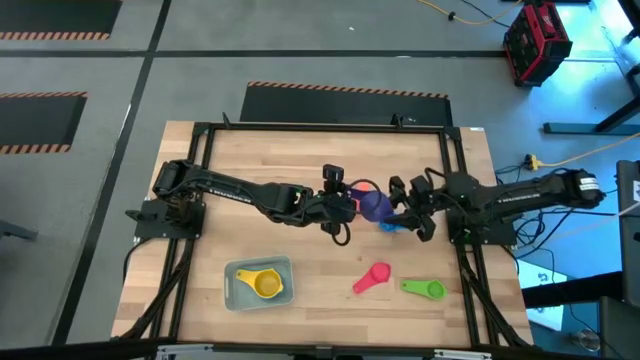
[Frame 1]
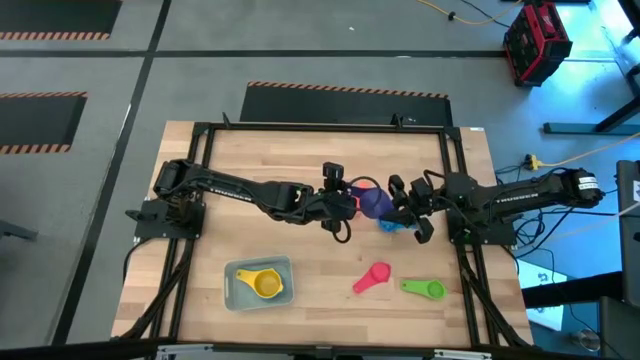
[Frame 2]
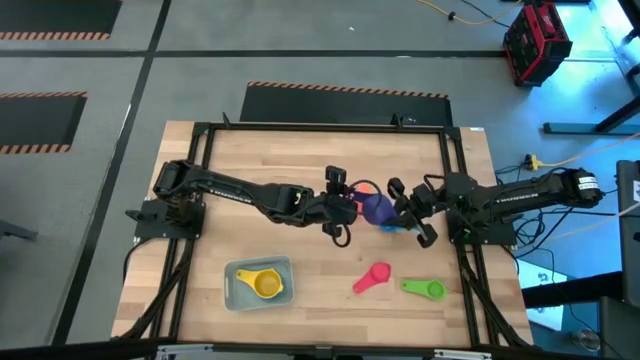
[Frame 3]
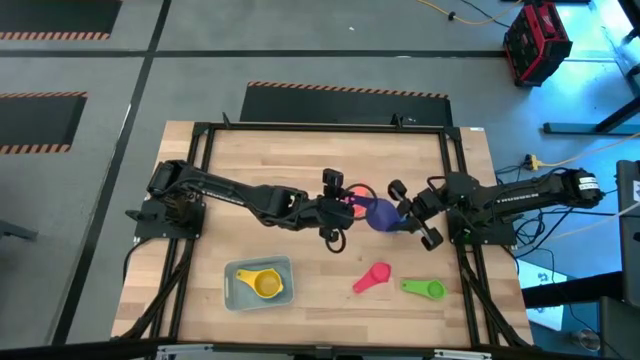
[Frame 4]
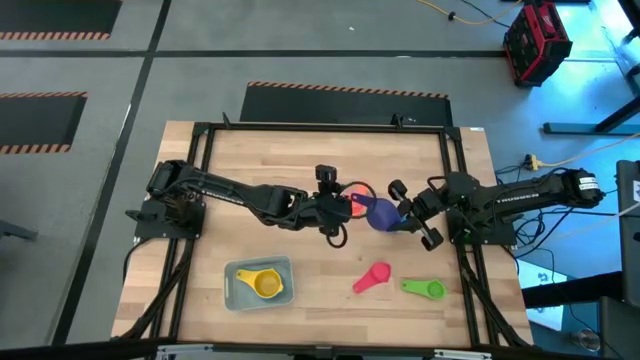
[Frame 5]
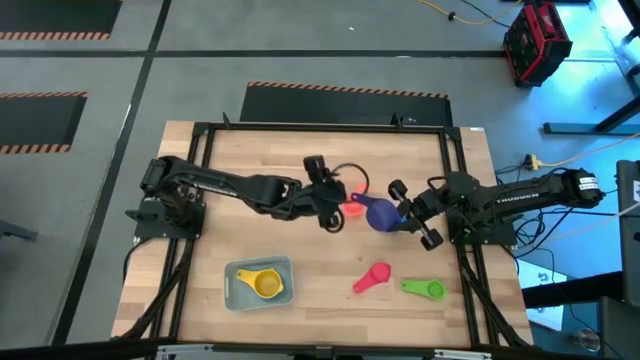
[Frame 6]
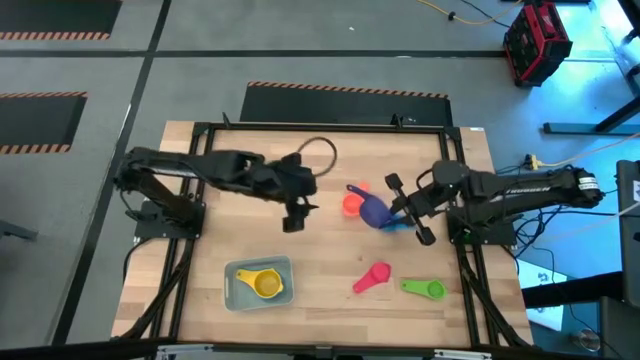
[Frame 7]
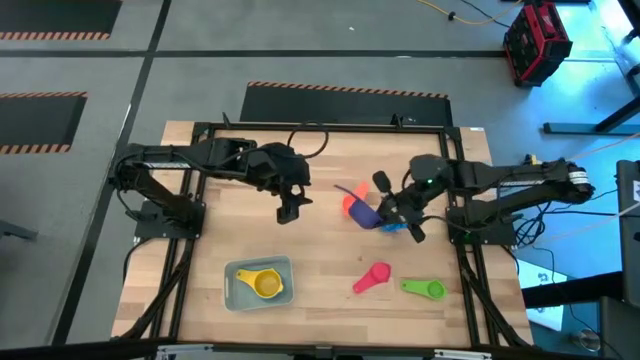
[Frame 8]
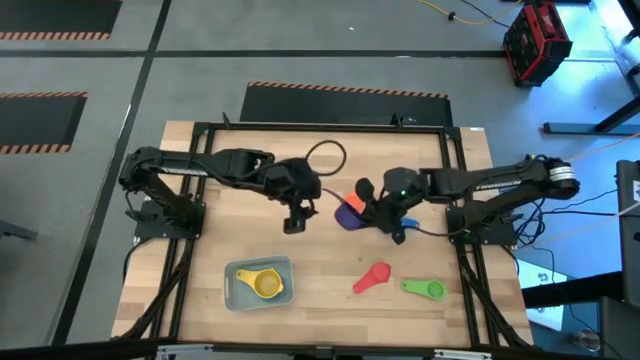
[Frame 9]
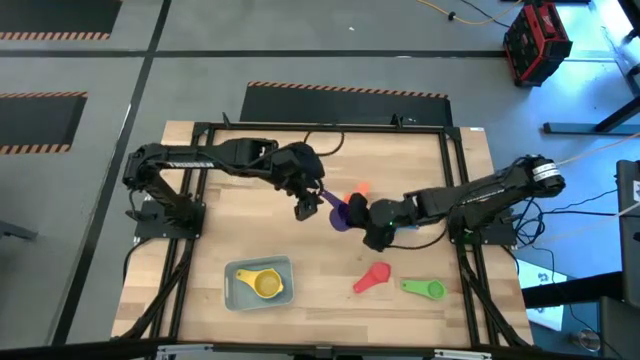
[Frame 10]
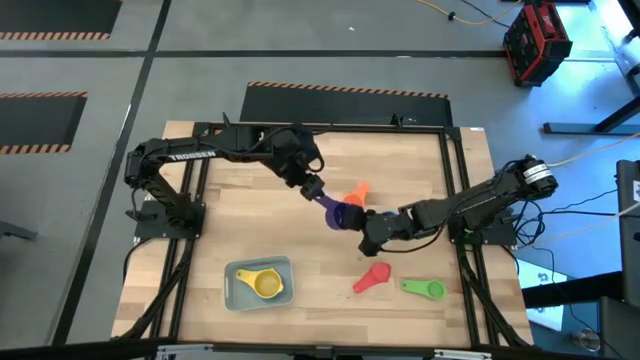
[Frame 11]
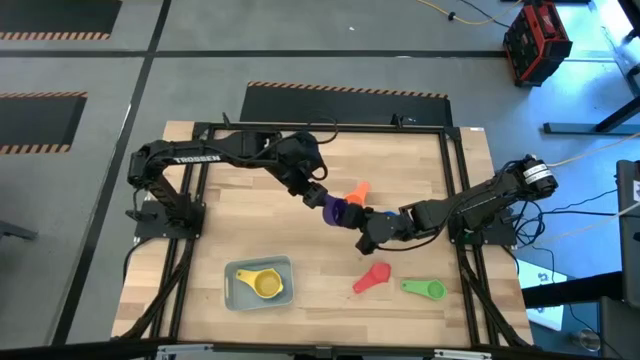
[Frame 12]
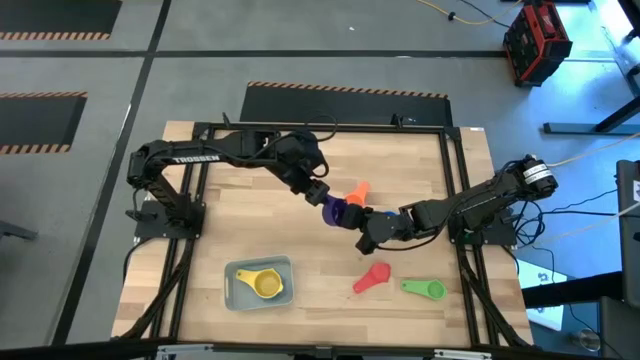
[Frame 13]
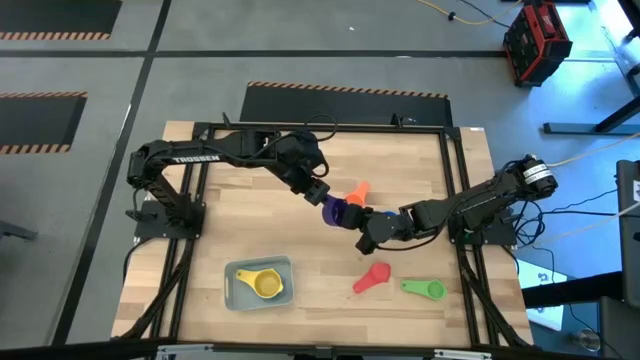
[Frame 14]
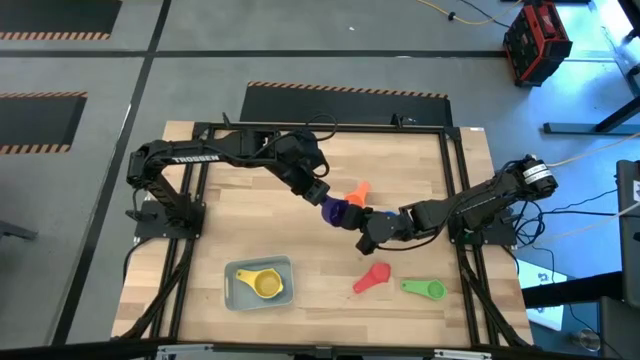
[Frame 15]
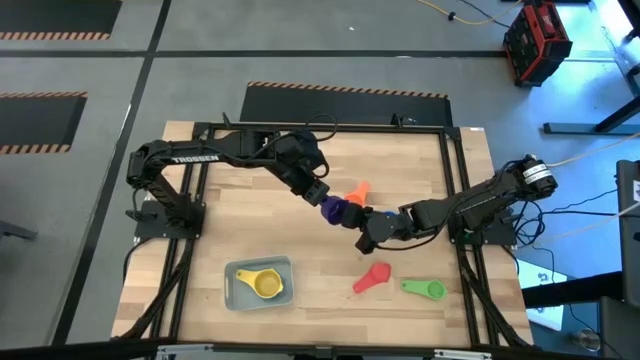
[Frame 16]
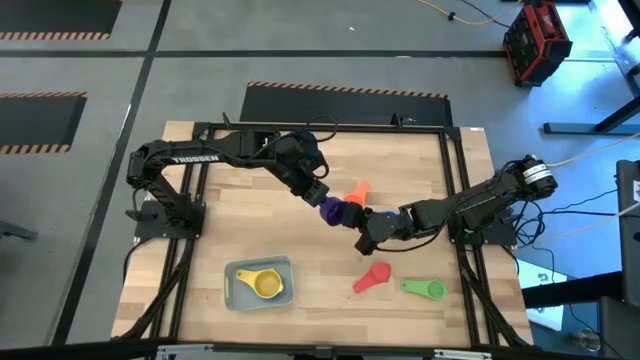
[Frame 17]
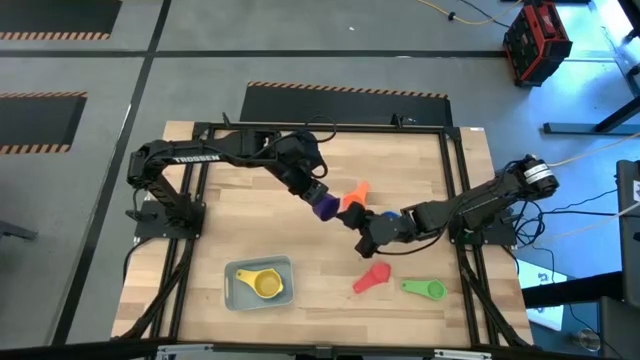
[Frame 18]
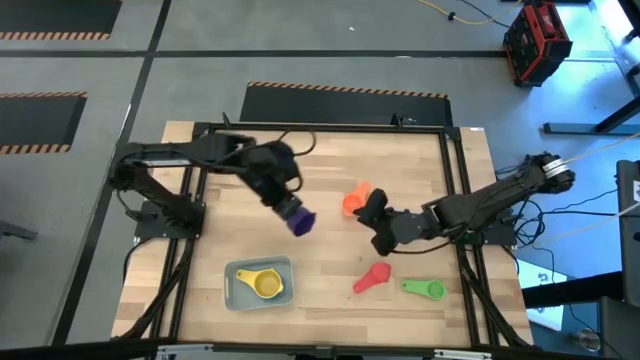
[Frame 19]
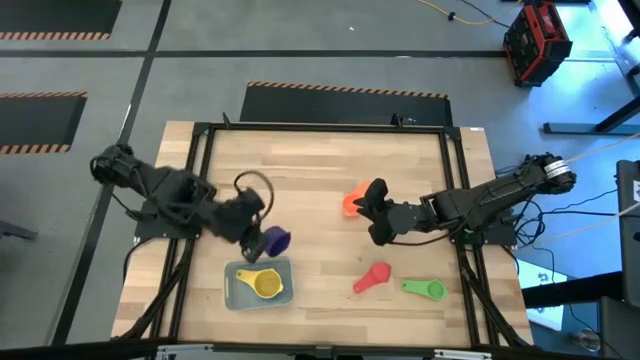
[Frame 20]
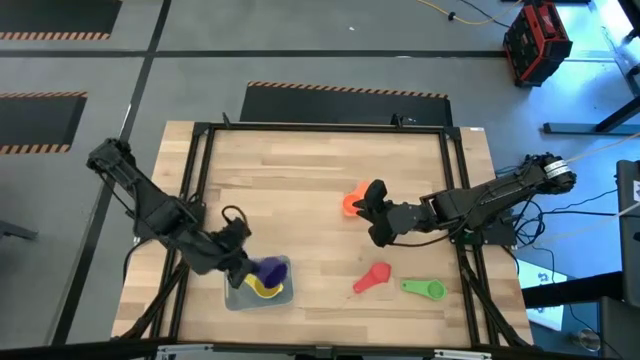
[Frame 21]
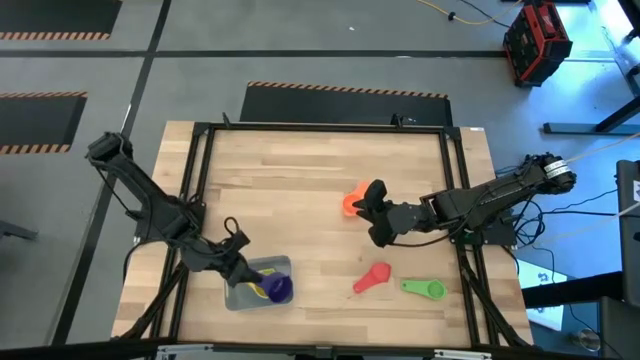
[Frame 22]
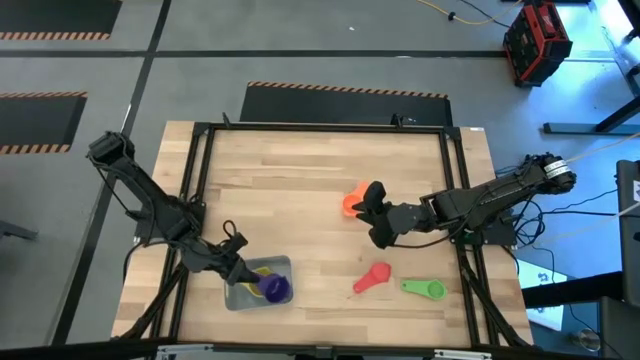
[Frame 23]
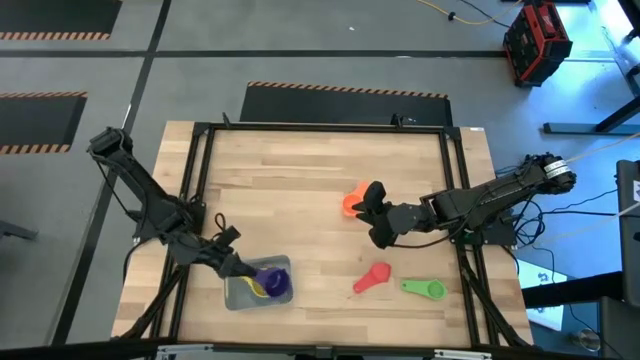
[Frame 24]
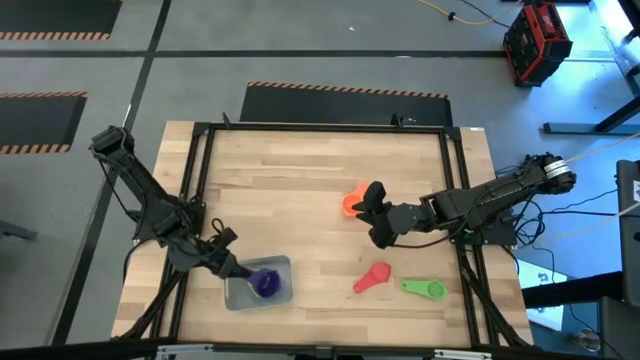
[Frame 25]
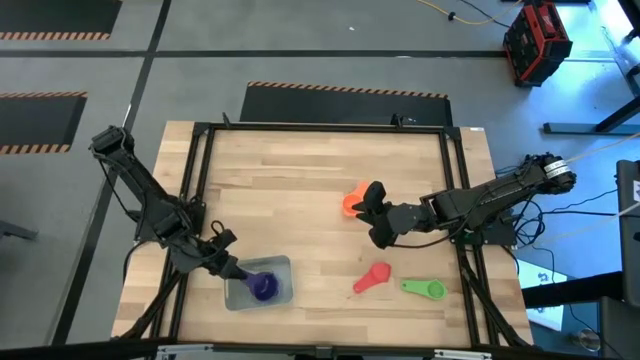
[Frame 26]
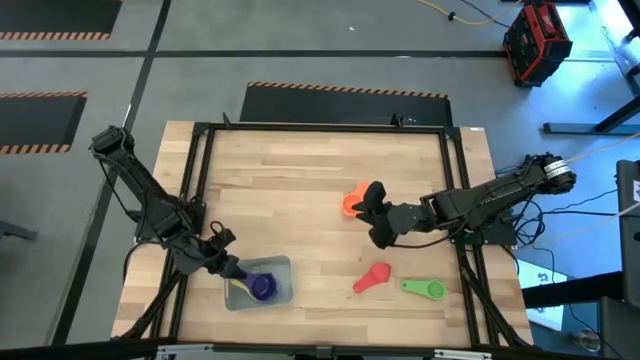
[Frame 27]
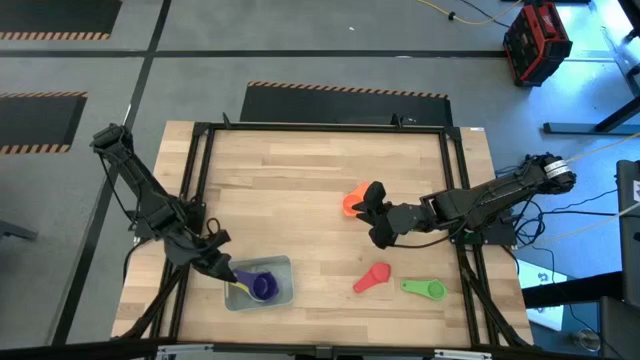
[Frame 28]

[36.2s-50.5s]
Task: Nest measuring cups in basket
Stack the violet measuring cup on top of the yellow measuring cup in the gray bin

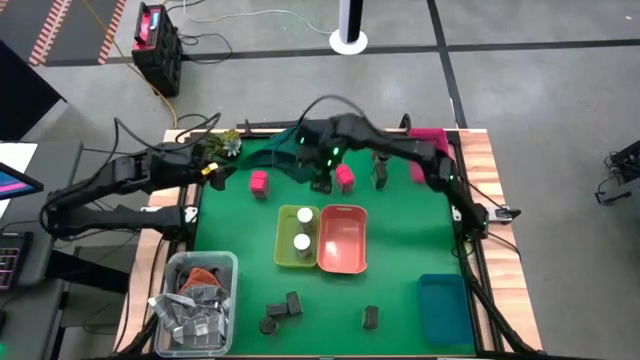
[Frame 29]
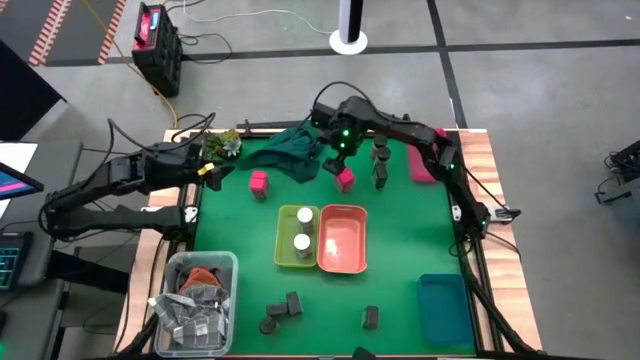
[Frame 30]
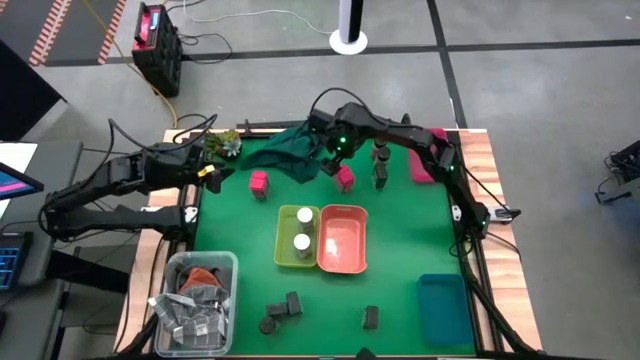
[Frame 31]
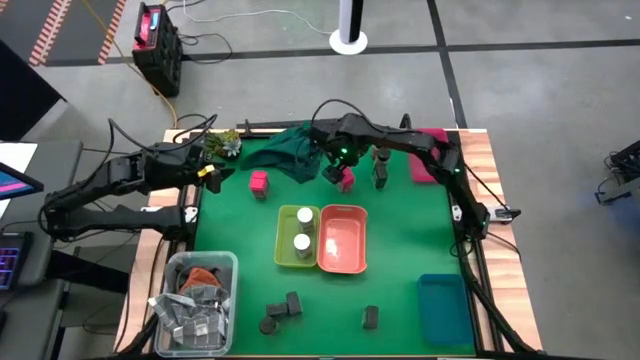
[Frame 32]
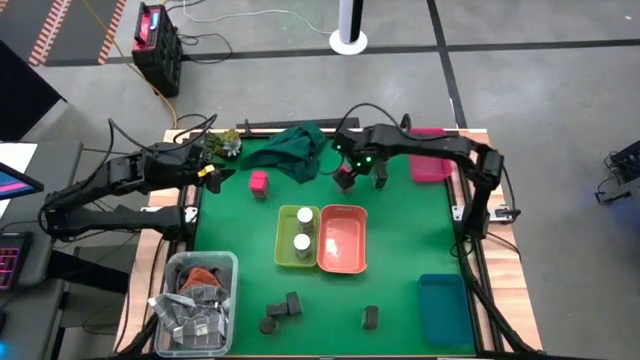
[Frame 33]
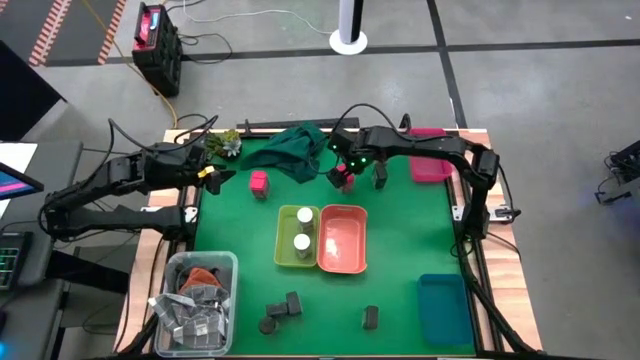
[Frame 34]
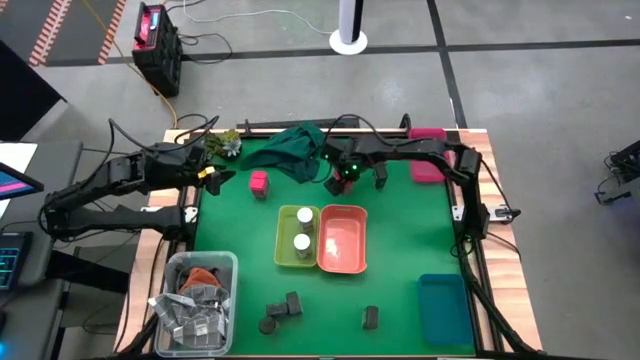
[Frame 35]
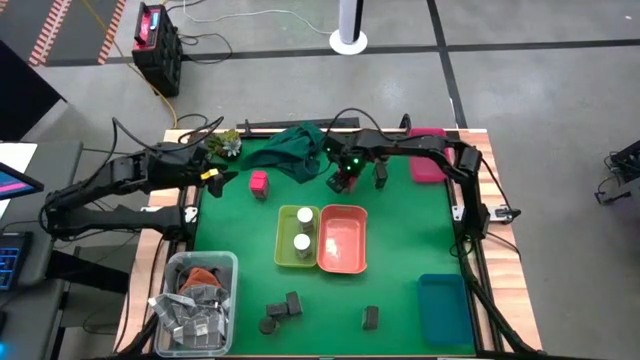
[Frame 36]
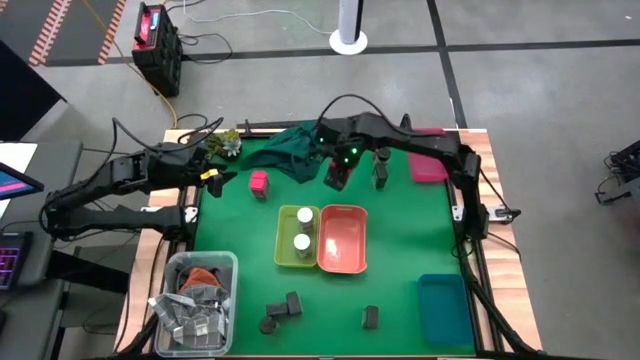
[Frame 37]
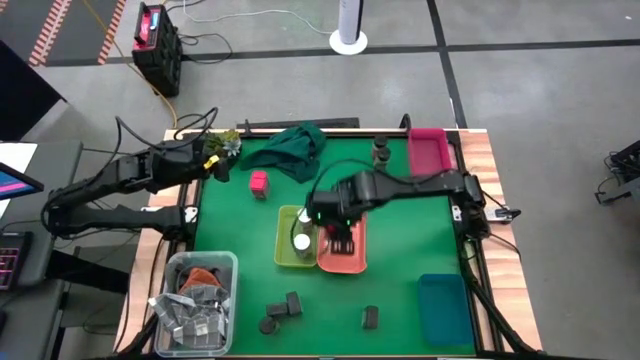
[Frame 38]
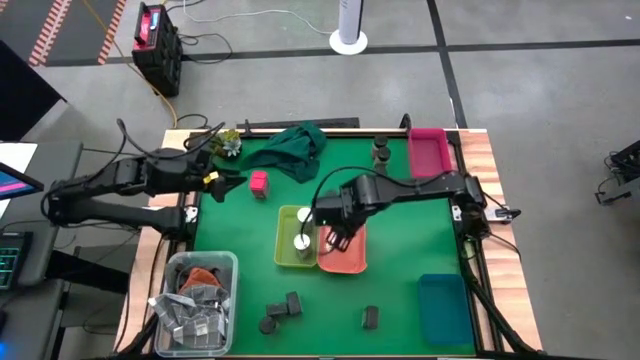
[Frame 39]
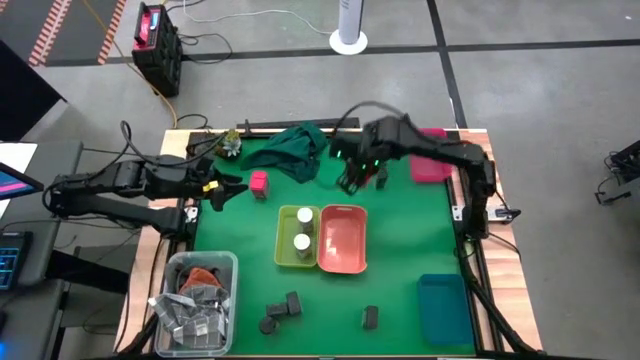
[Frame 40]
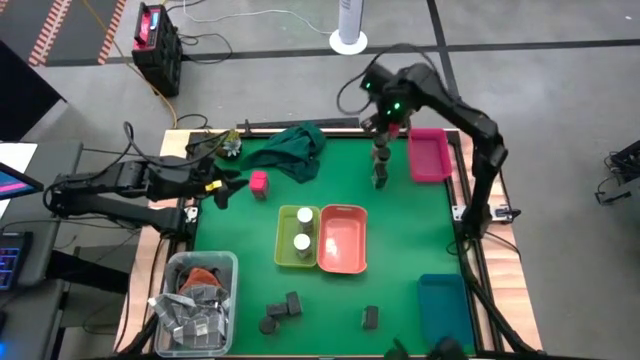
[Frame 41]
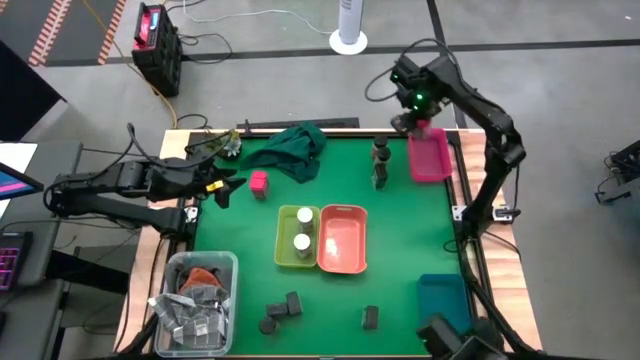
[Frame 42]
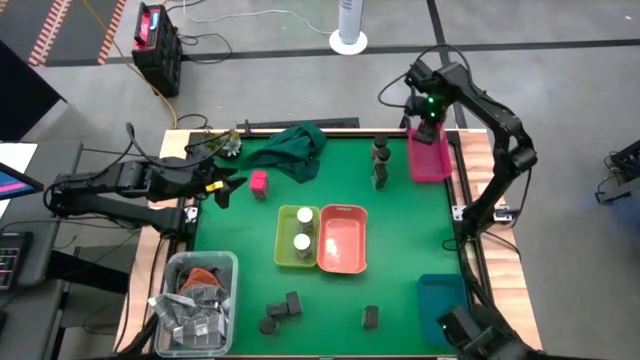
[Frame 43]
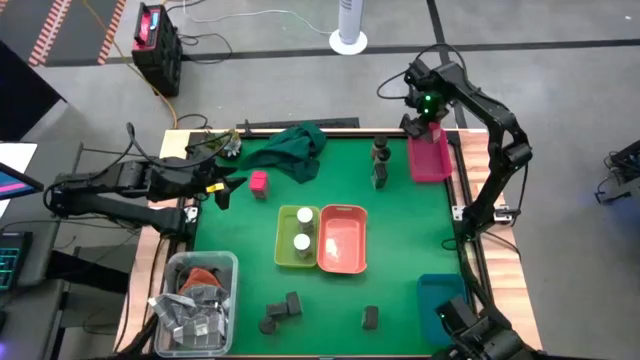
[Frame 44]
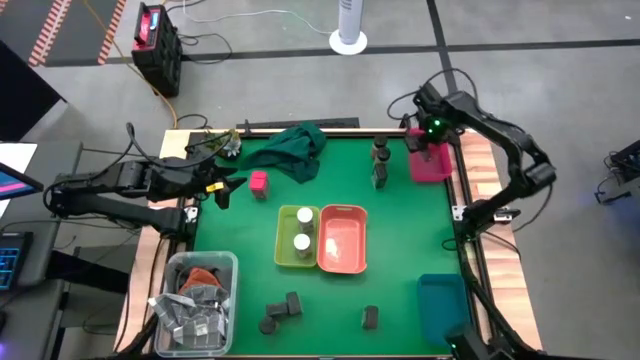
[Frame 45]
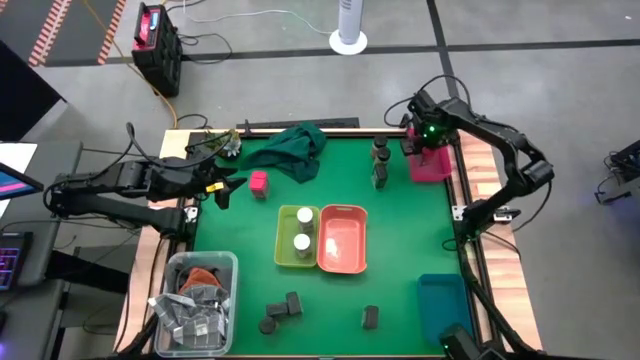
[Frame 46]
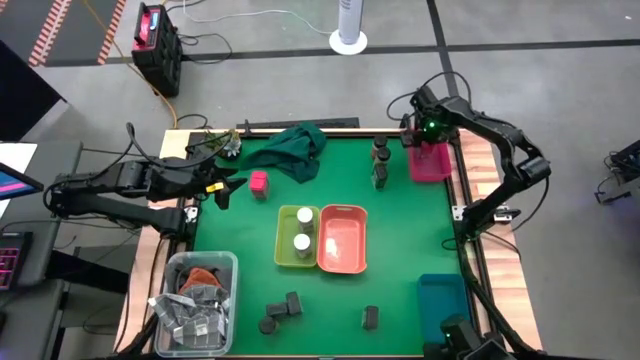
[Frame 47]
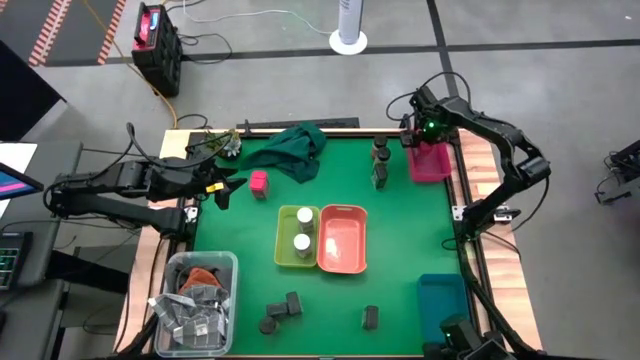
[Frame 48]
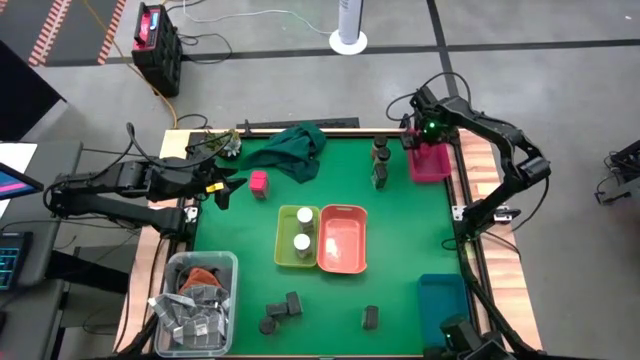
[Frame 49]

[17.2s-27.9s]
Task: Sort spices by type
Put the right red seasoning can into the pink bin
